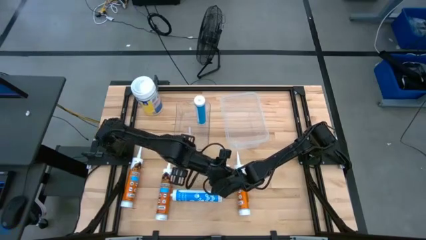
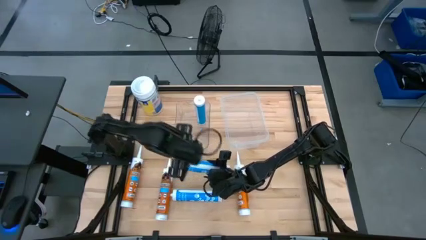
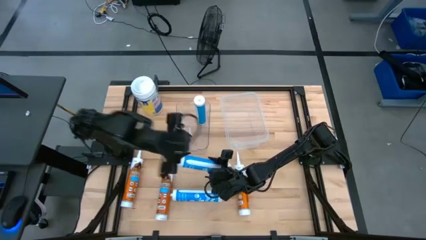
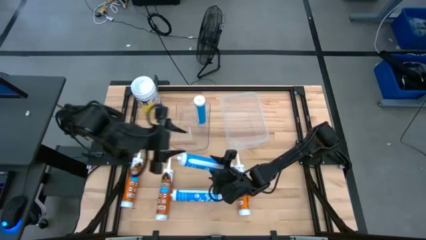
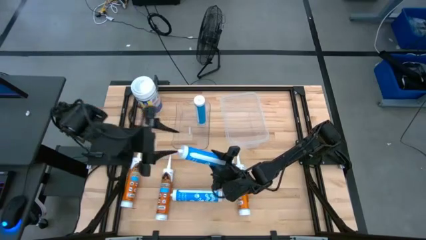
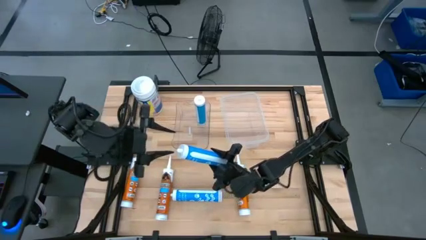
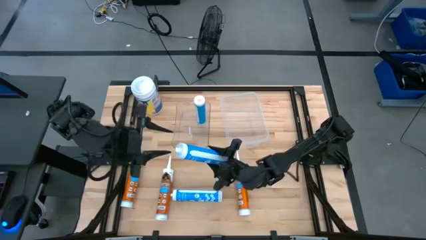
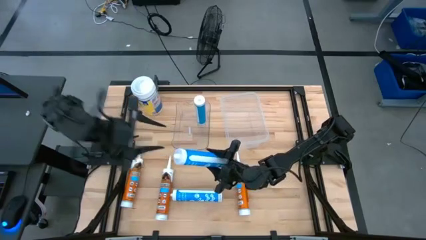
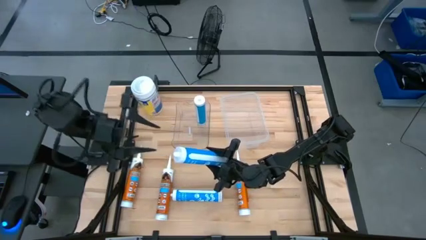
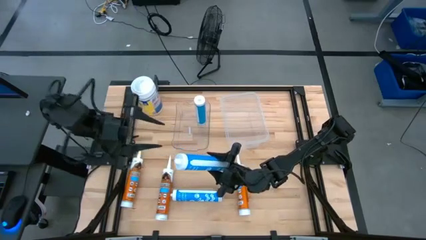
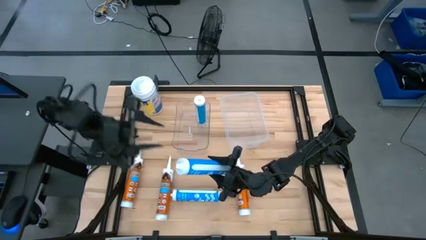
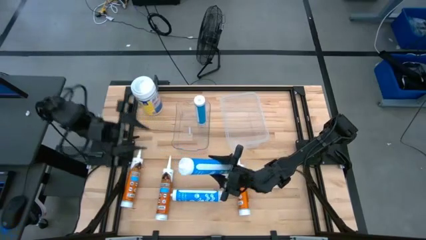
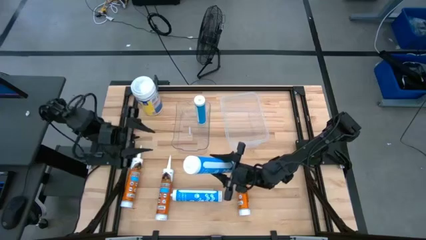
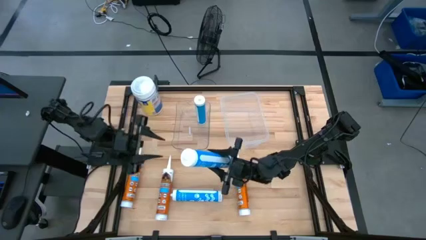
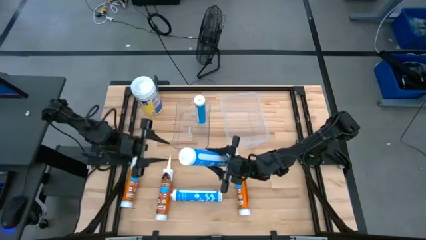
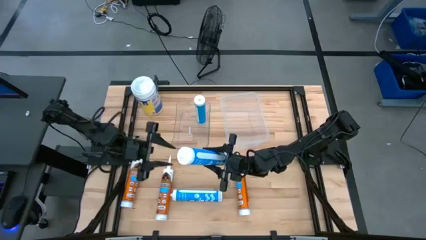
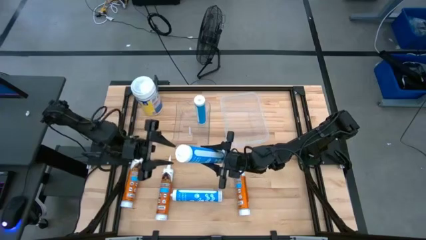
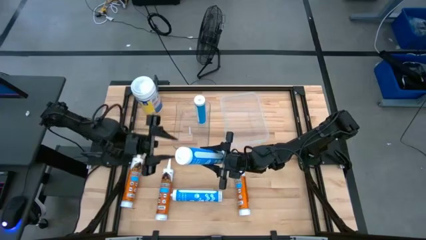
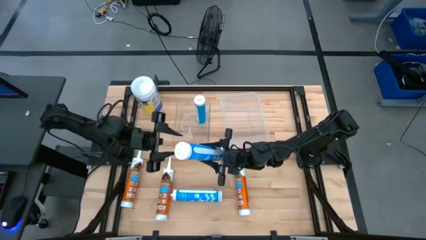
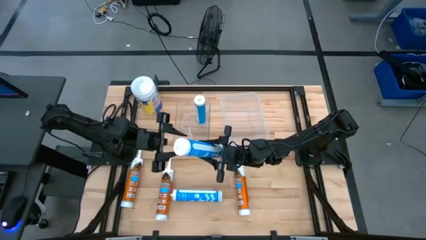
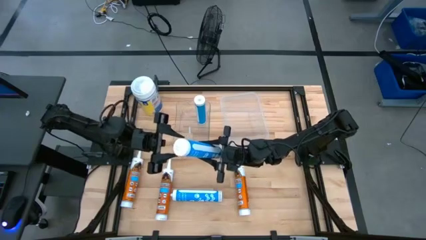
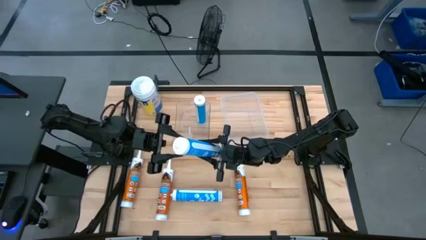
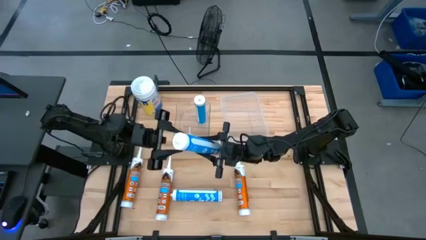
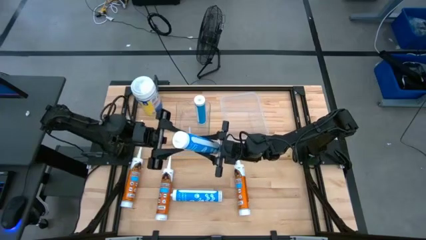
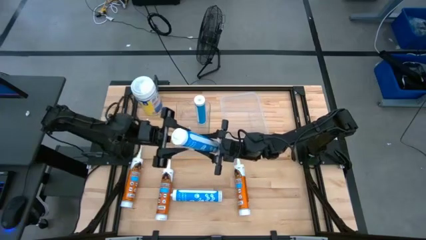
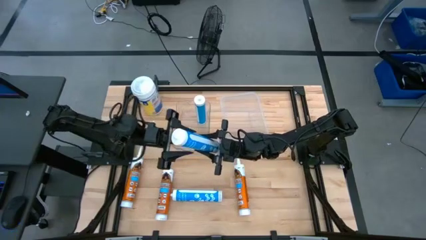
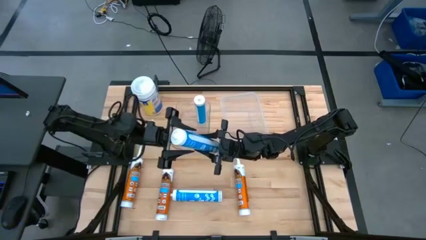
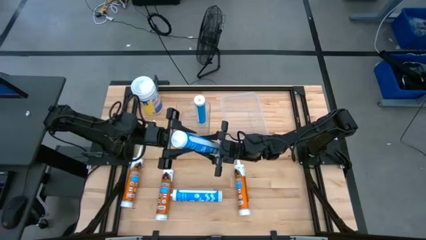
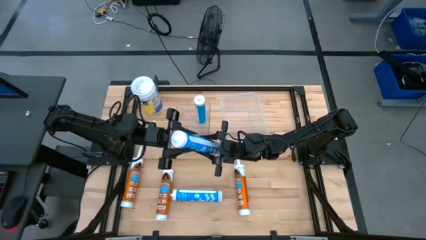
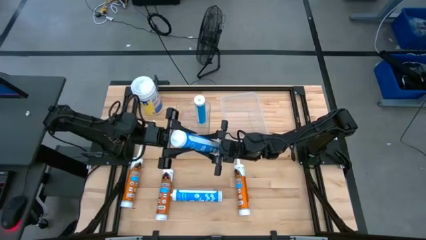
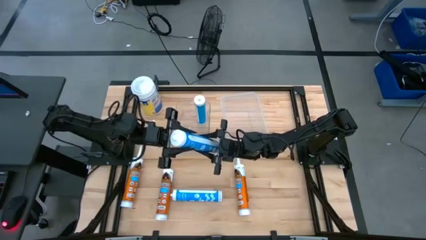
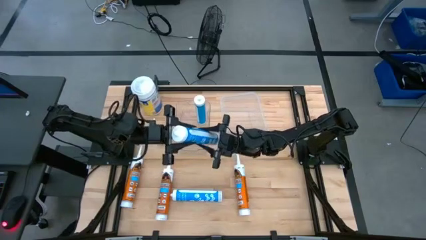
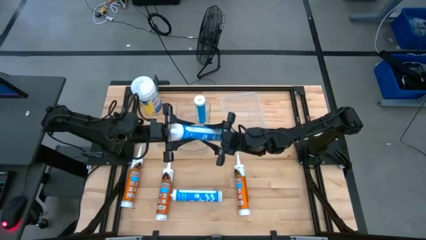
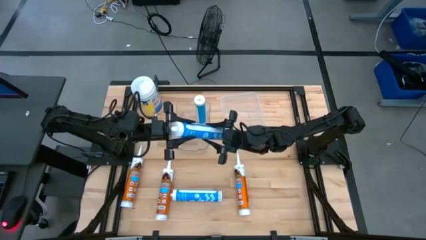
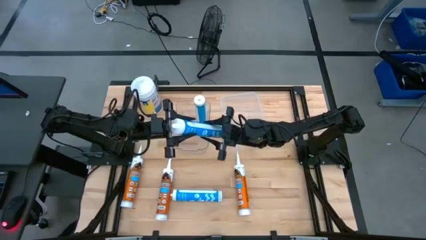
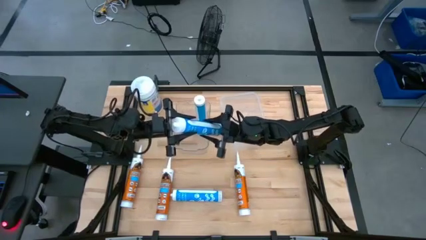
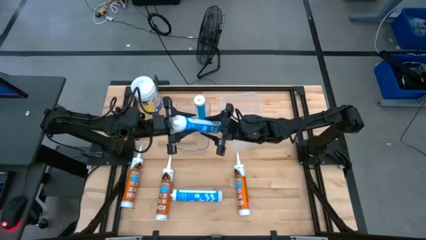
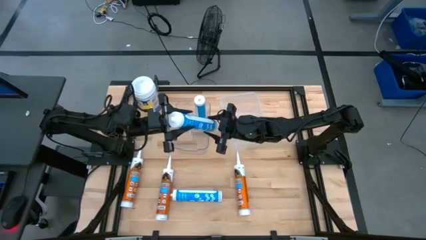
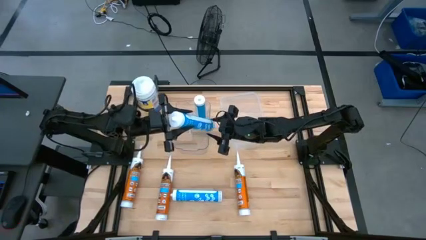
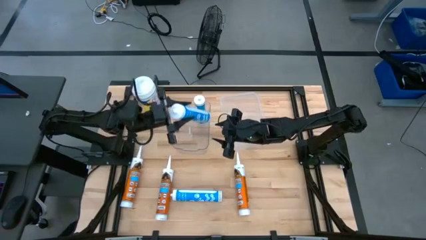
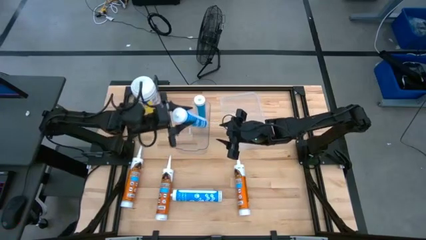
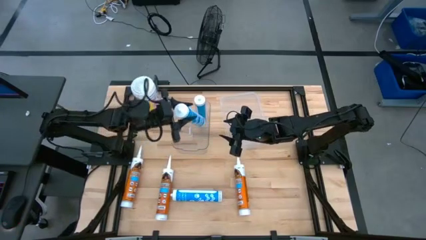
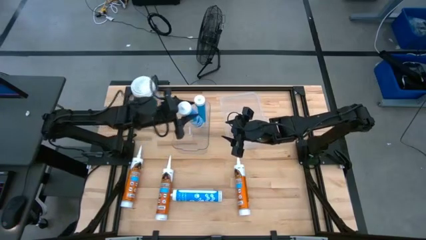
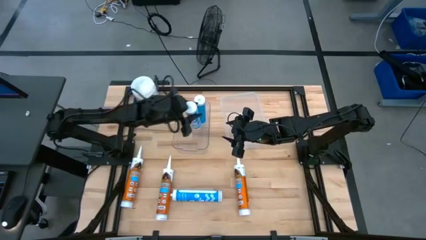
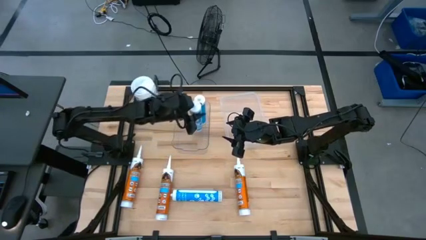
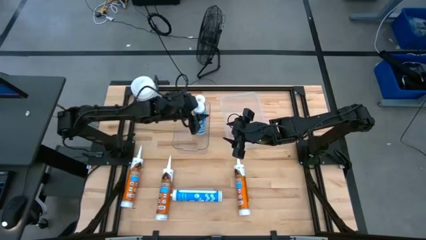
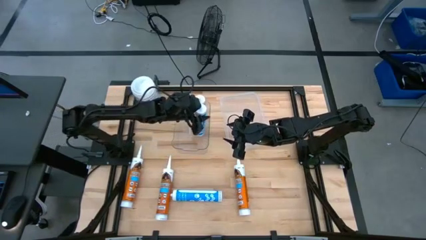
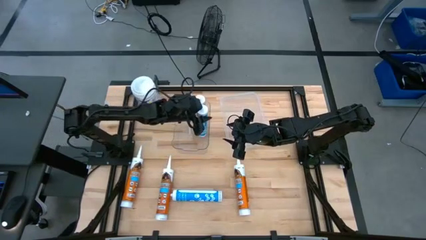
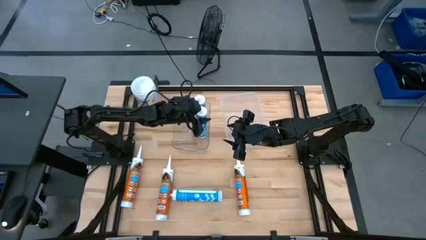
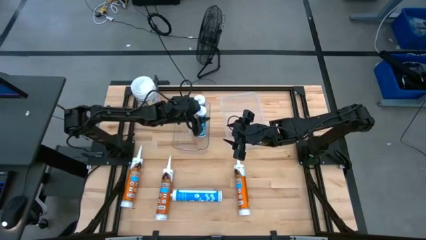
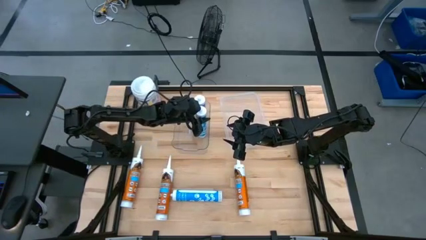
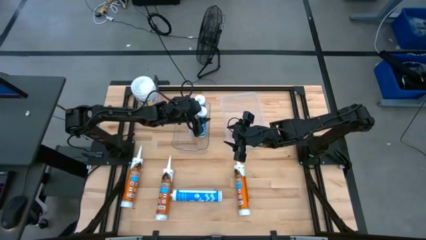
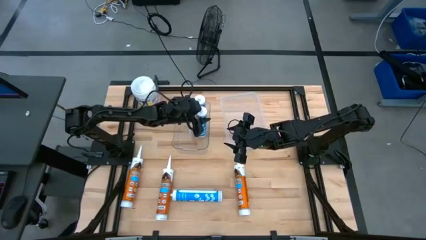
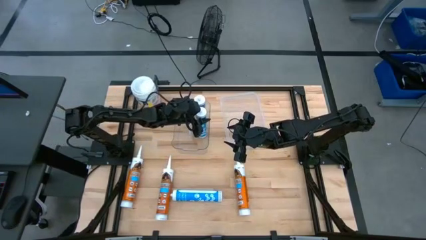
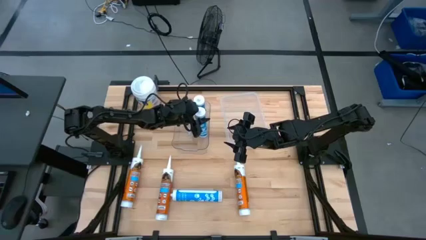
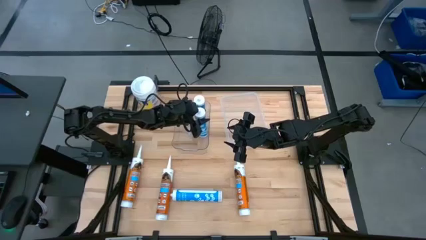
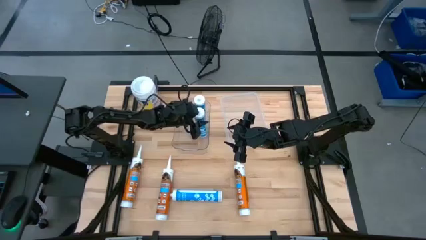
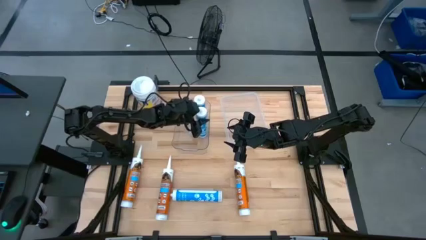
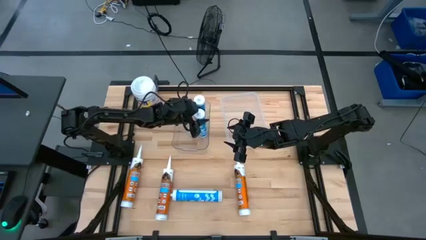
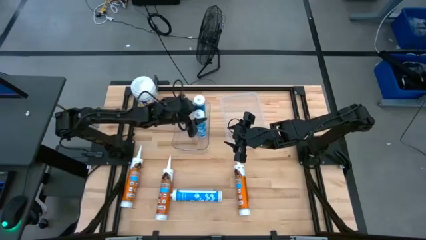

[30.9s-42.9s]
Task: Pick & place silicon tubes, Sealant and Lysol wipes
Put the top blue sealant into the left transparent bin
